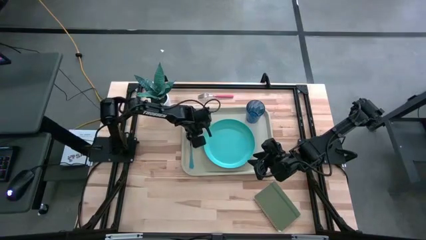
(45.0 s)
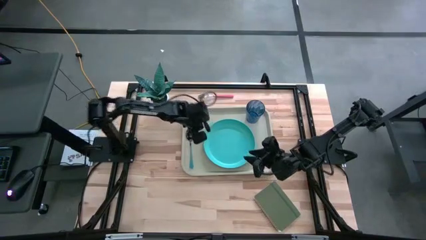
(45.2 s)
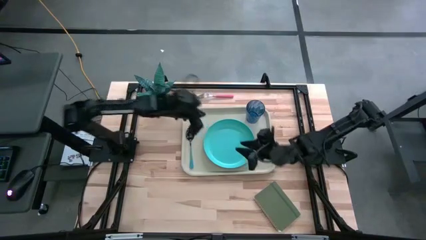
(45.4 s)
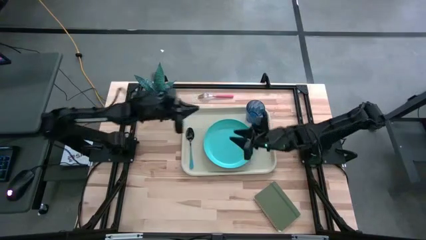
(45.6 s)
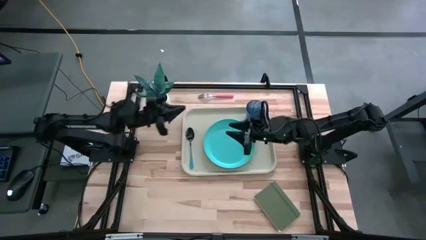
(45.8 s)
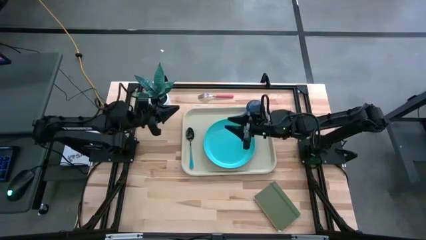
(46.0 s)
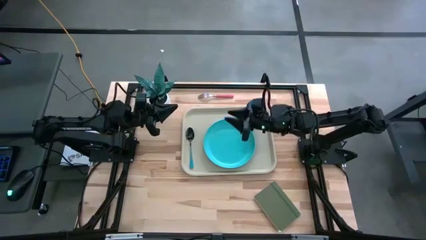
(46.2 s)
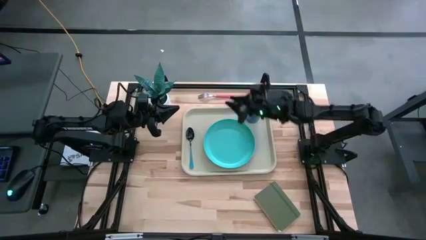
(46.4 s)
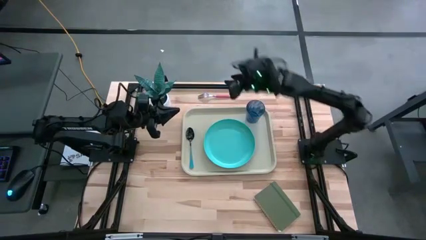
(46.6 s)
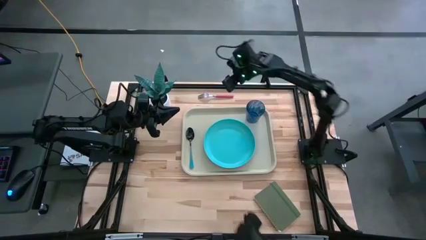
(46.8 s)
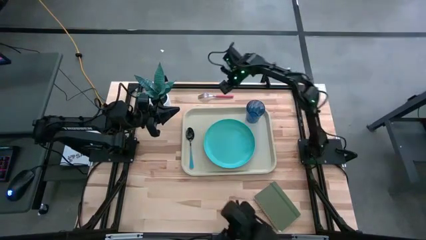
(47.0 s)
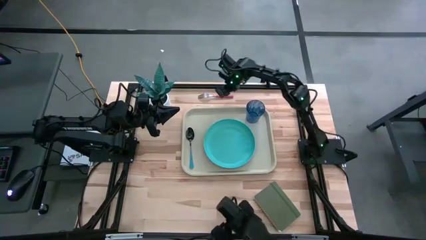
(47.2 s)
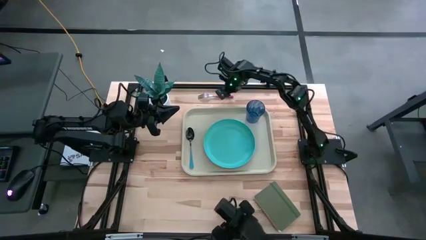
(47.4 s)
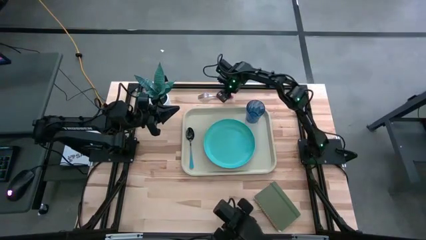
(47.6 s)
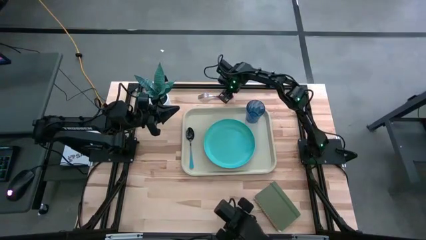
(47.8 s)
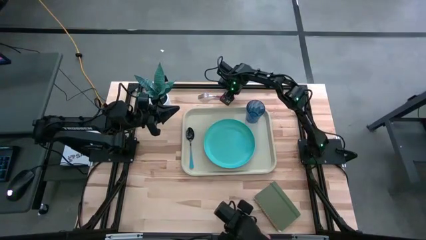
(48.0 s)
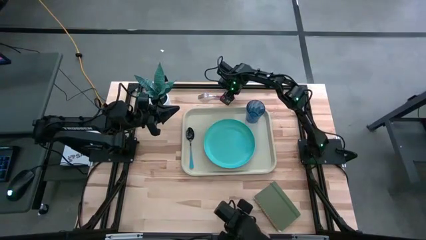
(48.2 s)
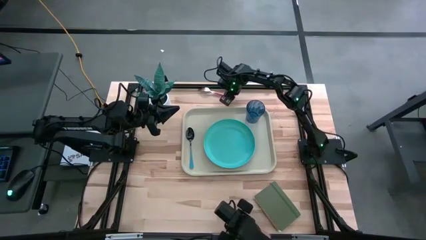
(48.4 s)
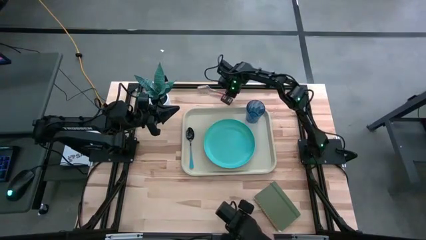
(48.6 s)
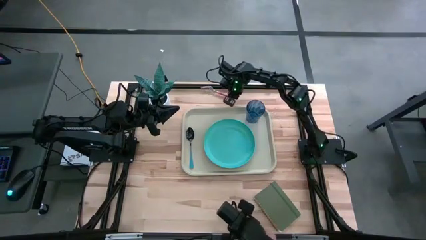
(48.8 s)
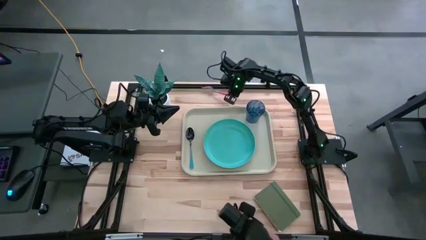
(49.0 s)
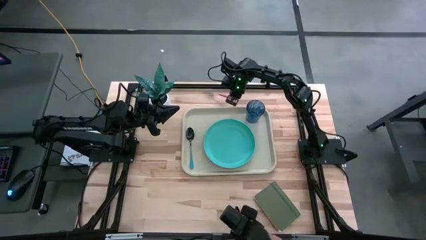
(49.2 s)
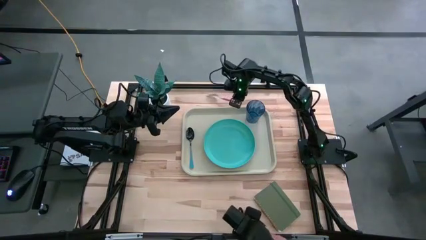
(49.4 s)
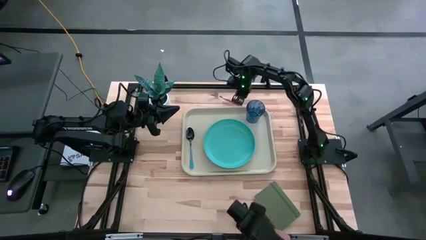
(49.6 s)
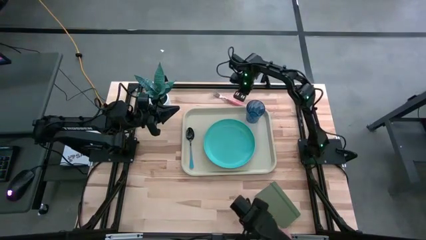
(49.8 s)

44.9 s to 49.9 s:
Task: Pick and place plate/cup/fork/spoon on tray
Put the pink fork on top of the gray tray

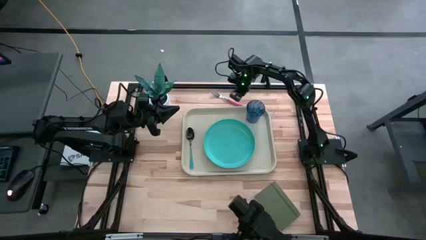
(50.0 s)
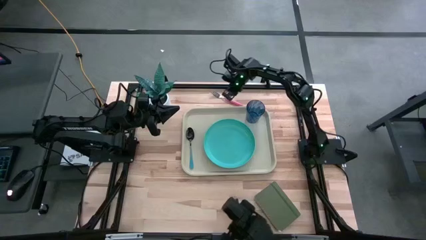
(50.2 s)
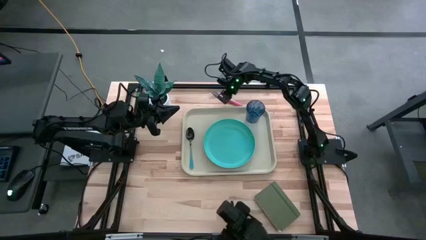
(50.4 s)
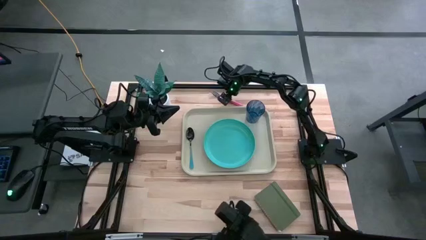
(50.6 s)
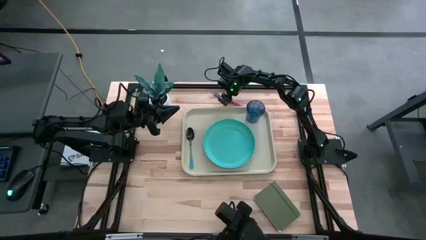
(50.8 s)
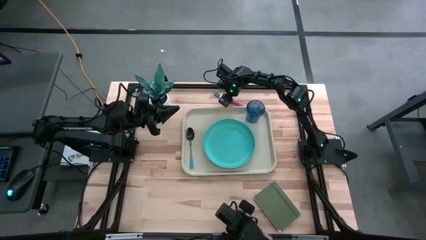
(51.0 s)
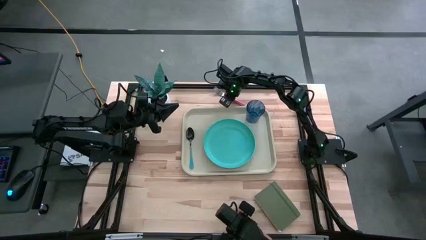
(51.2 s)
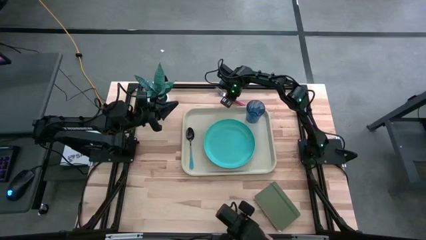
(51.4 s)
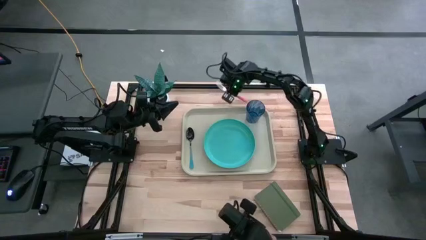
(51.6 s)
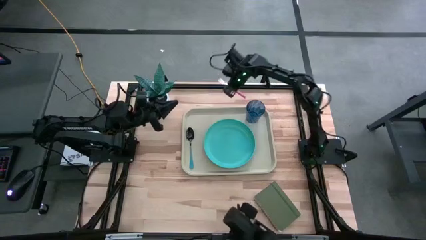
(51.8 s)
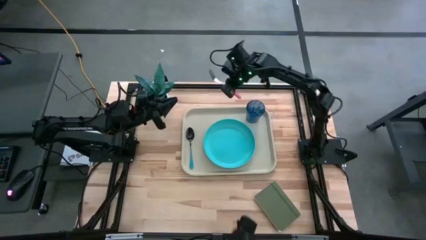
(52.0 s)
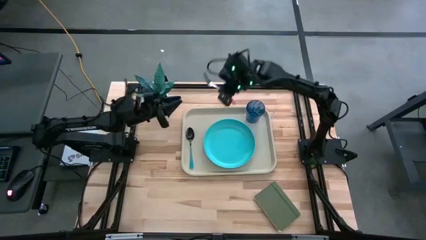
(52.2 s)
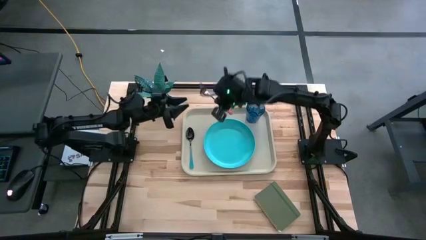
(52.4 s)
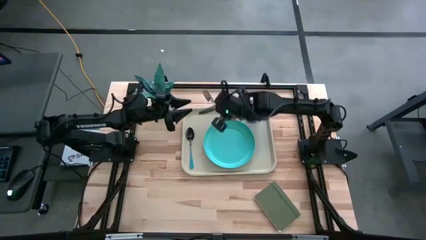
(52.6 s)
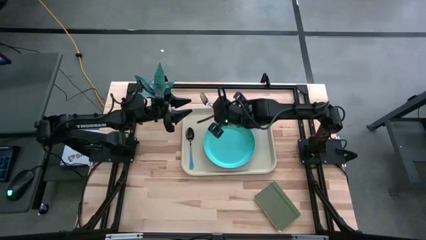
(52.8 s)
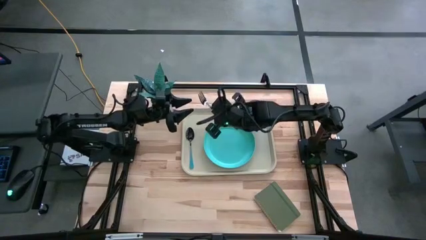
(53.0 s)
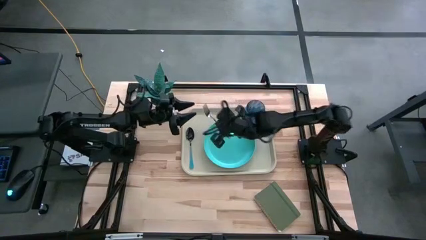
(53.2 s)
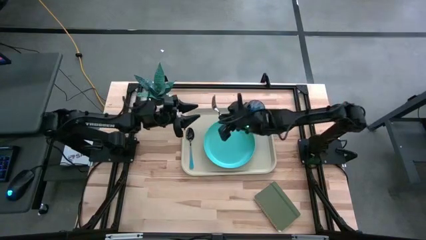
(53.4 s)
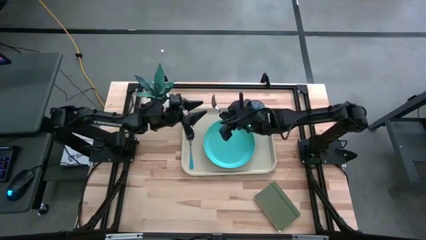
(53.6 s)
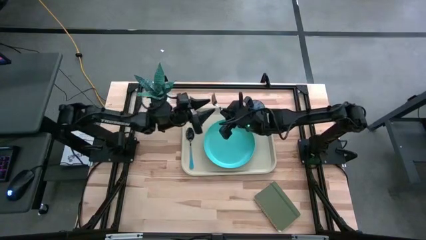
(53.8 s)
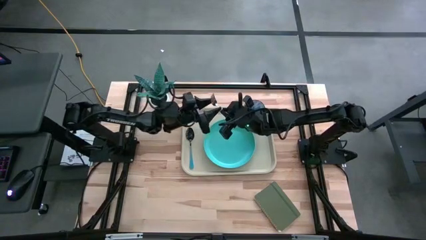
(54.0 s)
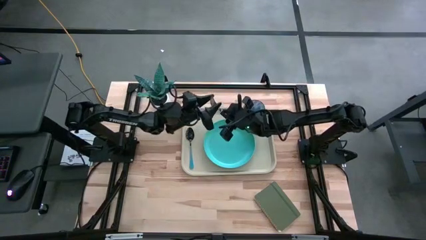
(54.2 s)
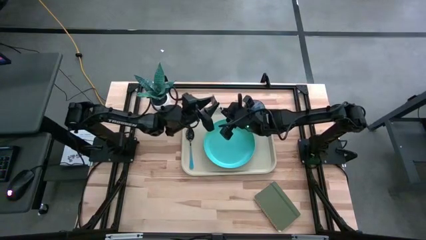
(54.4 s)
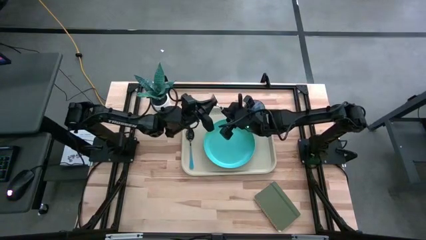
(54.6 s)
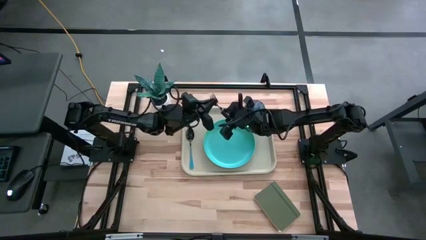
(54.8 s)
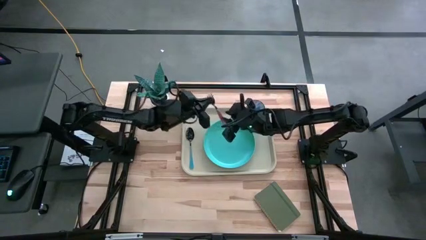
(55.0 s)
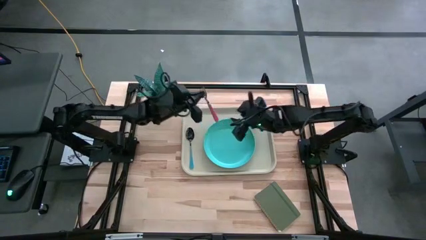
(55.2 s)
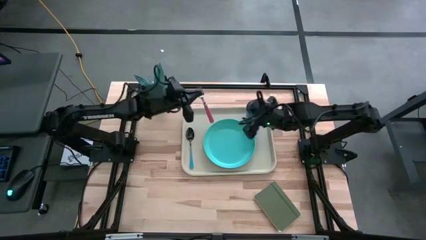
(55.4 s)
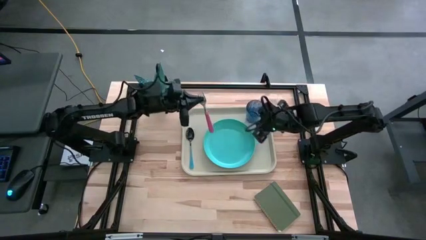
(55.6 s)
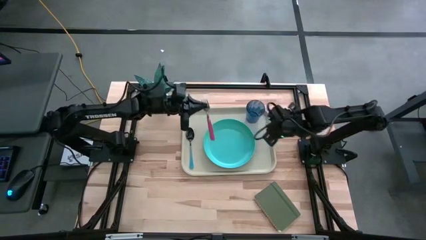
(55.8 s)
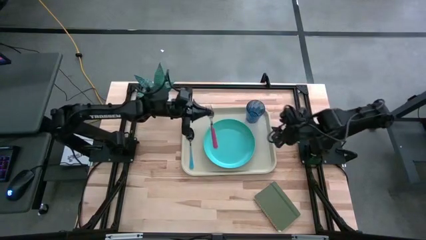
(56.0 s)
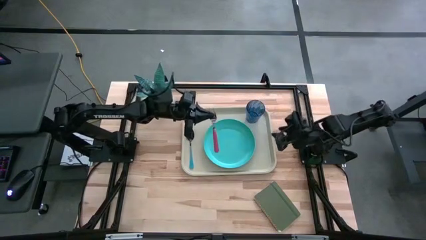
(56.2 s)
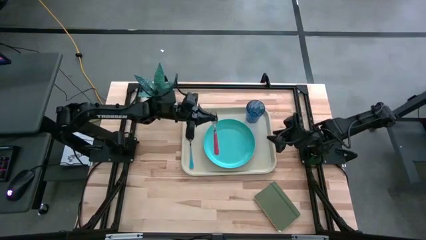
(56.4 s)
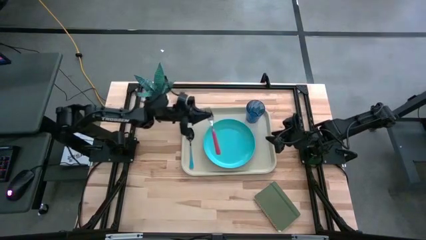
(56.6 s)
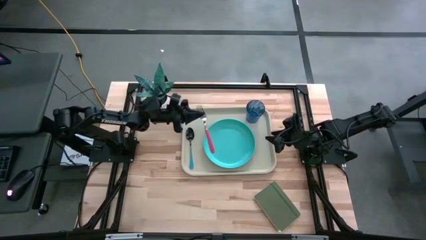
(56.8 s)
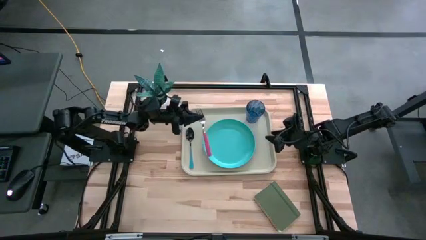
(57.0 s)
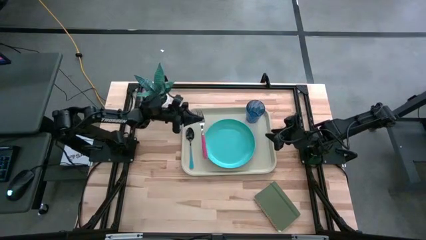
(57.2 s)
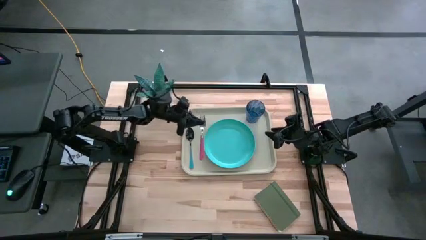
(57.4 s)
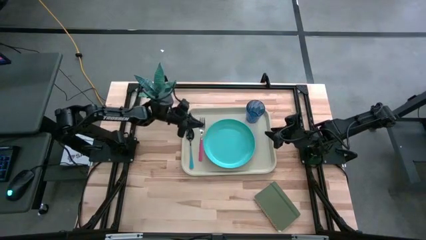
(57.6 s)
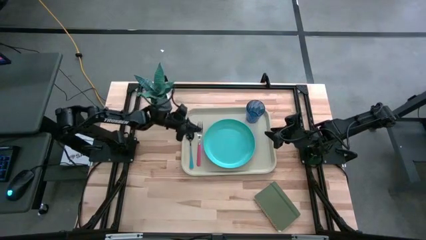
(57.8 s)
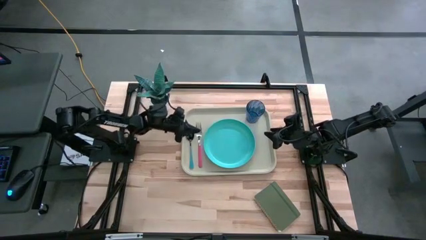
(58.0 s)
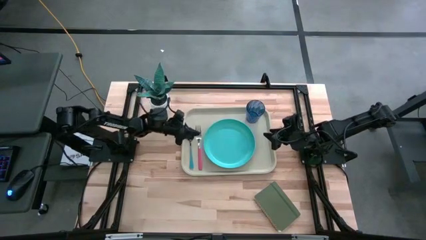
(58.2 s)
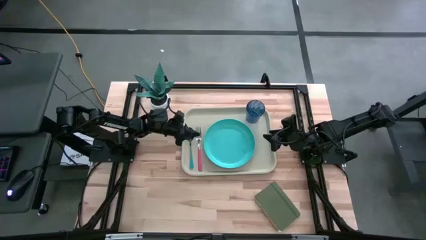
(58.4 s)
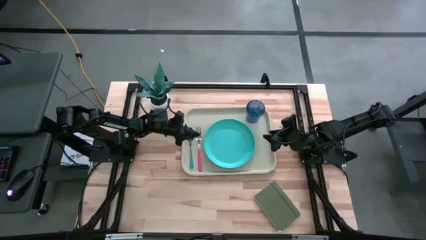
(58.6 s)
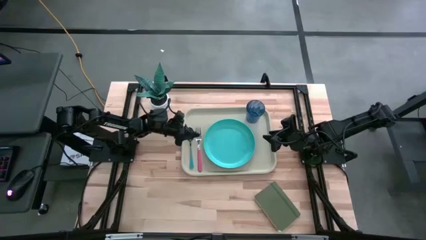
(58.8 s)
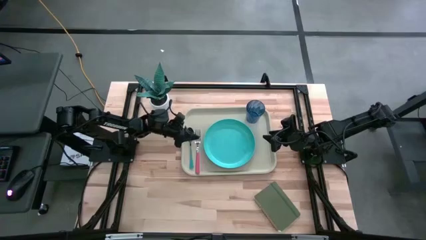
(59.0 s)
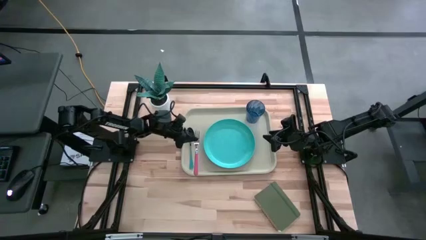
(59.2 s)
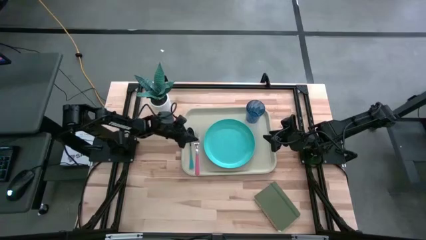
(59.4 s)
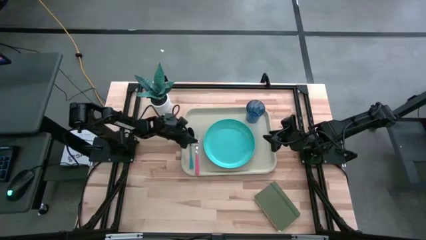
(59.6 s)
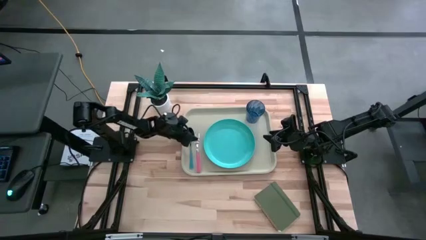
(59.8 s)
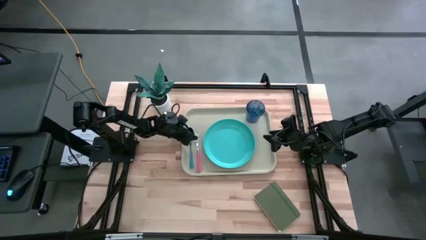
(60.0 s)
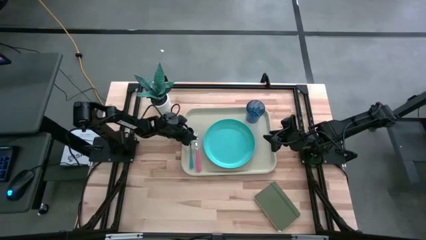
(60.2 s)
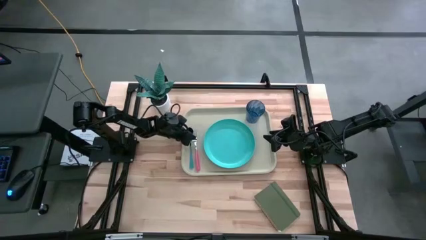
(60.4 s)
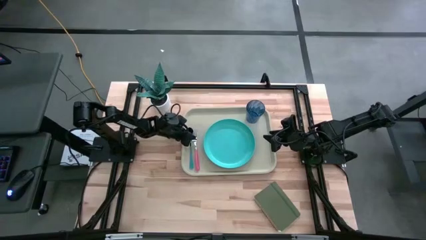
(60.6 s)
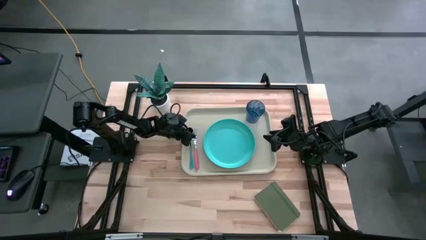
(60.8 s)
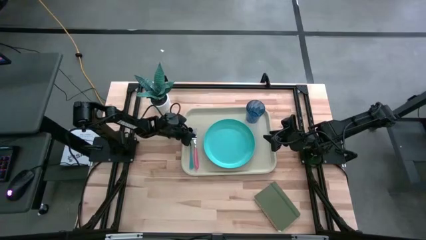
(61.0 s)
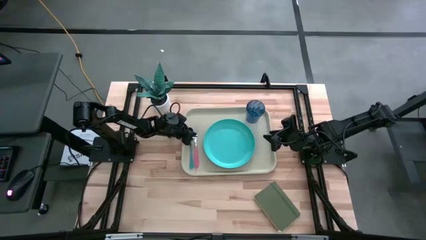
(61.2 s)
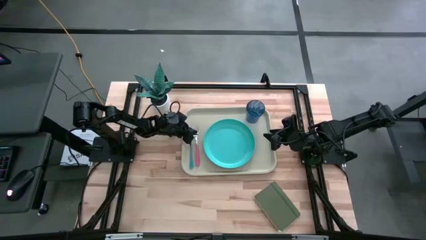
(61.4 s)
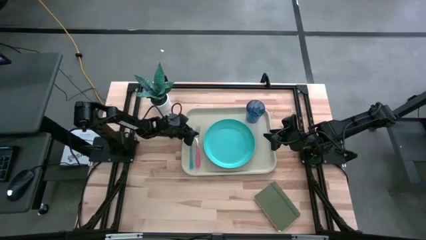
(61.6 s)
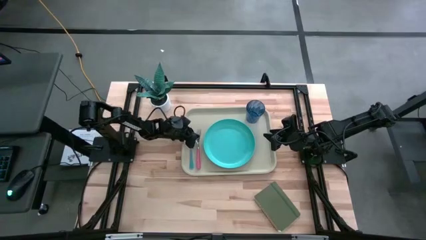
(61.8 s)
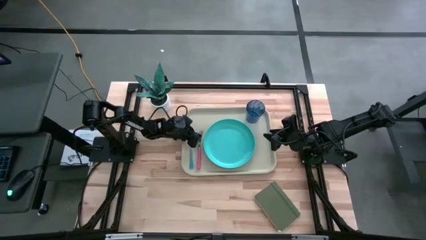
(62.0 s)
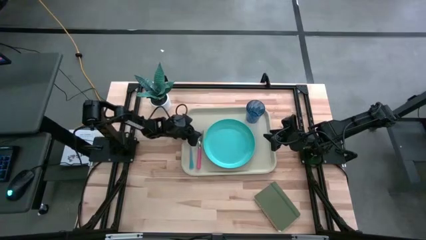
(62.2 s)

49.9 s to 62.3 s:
Put the pink fork in between the blue spoon and blue plate on the gray tray
